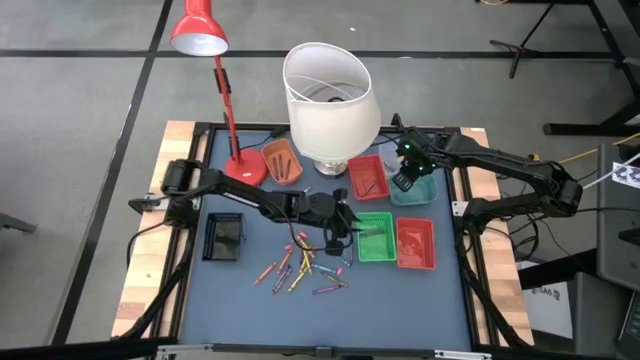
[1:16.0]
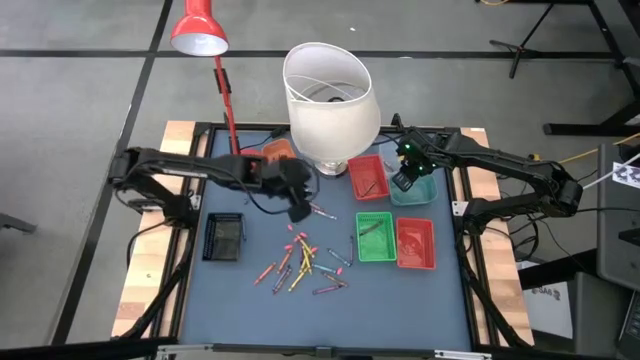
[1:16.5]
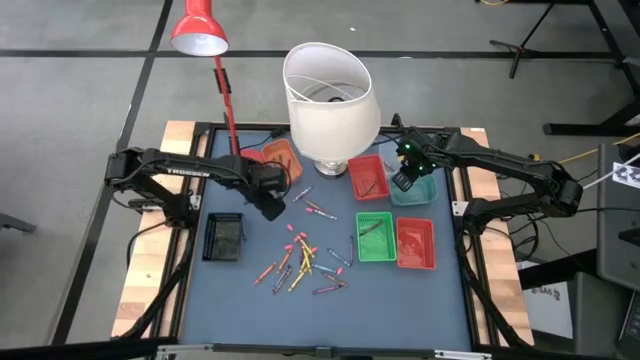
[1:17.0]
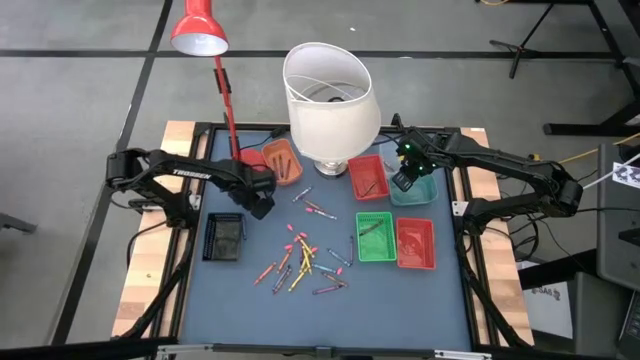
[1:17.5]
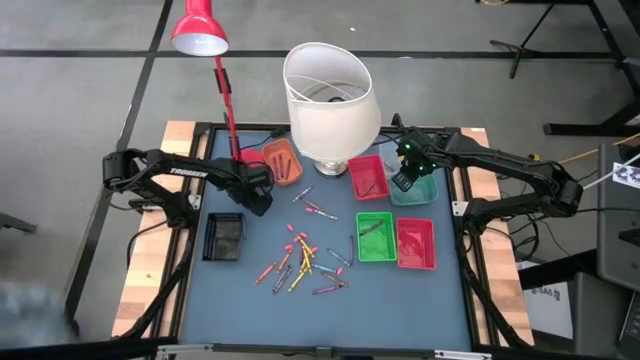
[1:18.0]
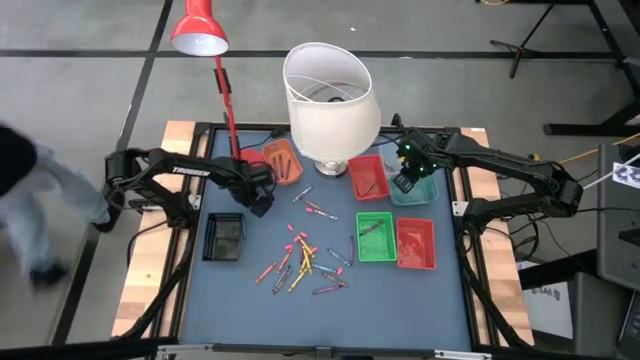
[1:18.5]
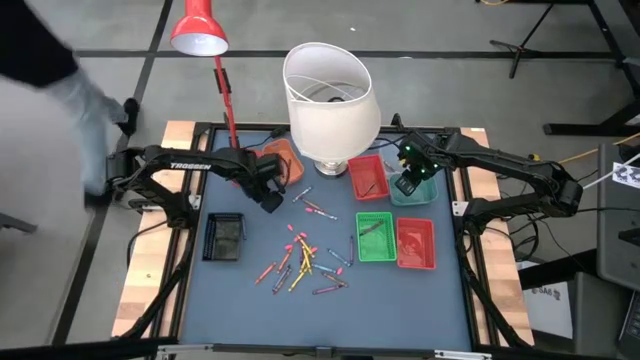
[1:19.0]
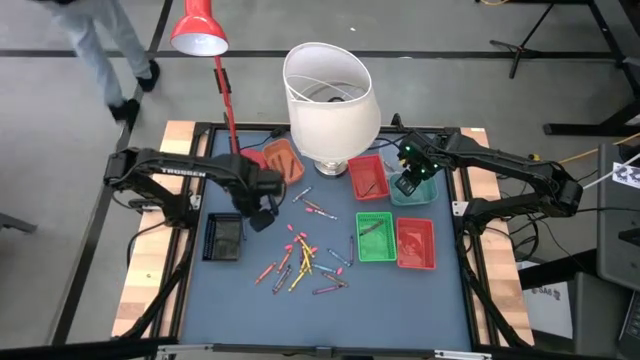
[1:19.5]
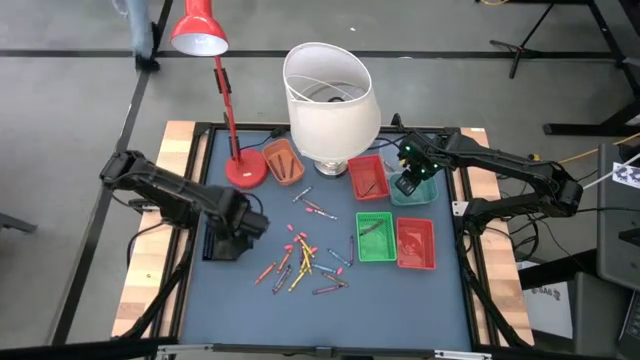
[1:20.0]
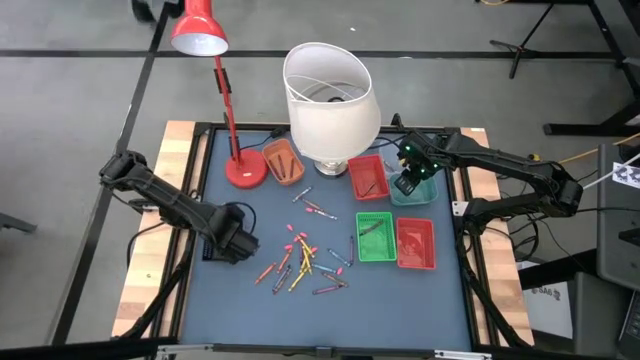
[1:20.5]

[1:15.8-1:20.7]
Task: Sort crayons
Put the blue crayon into the black bin

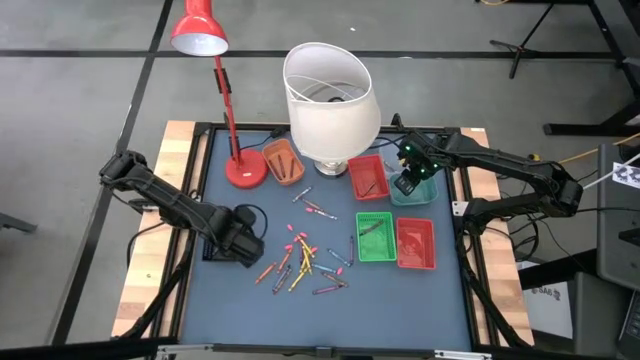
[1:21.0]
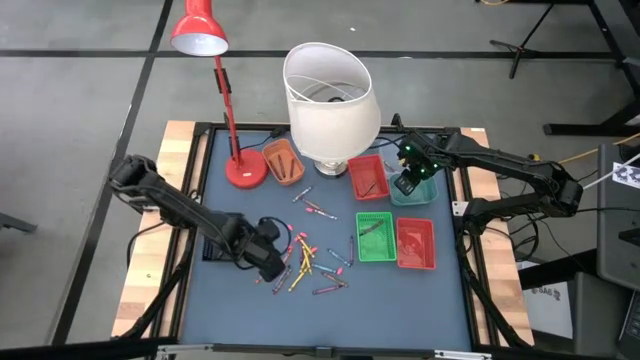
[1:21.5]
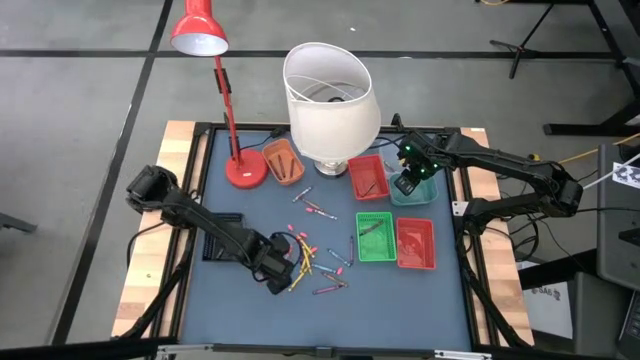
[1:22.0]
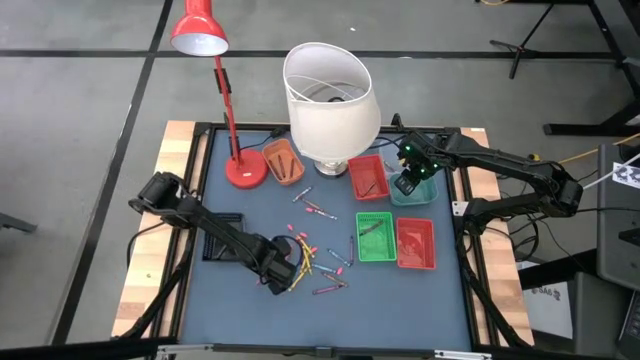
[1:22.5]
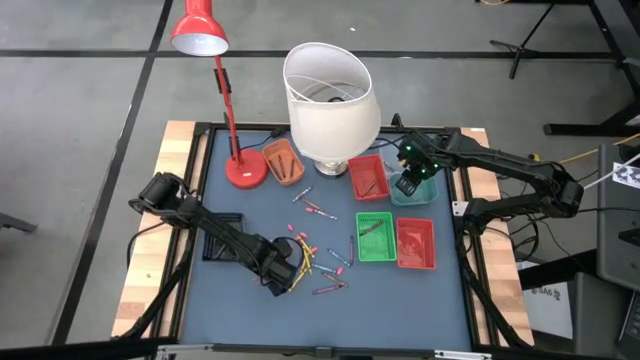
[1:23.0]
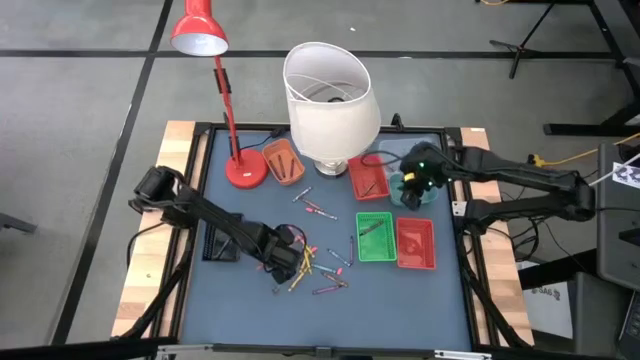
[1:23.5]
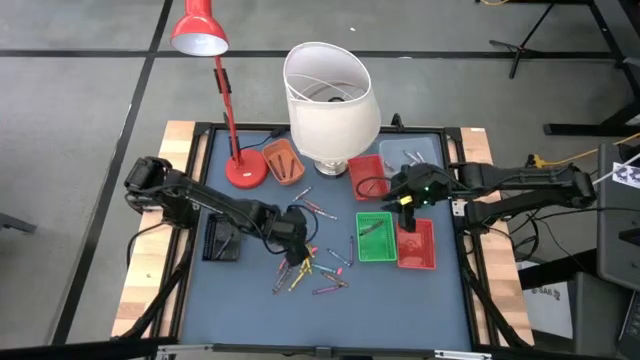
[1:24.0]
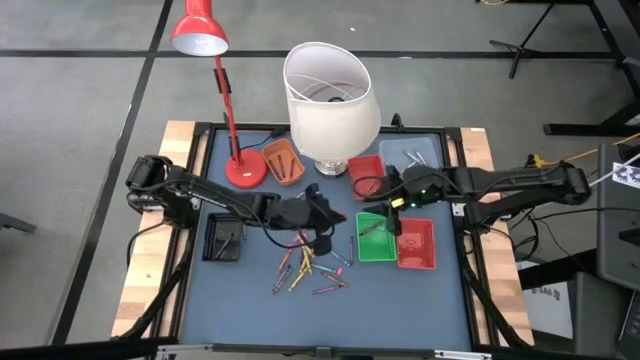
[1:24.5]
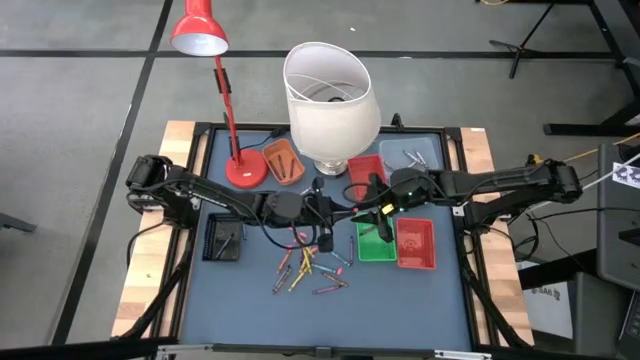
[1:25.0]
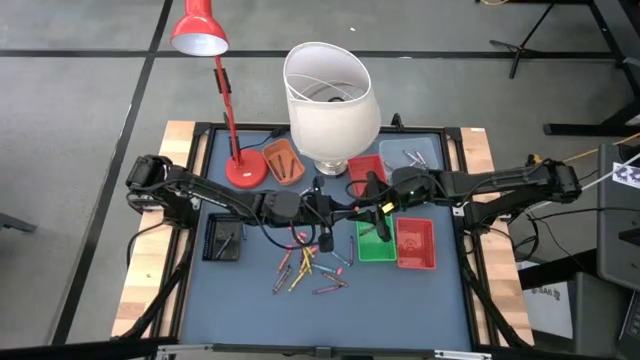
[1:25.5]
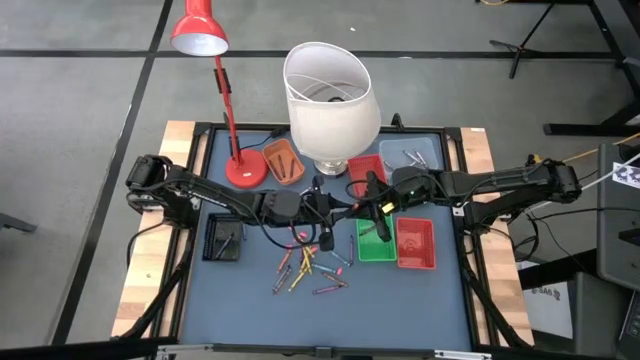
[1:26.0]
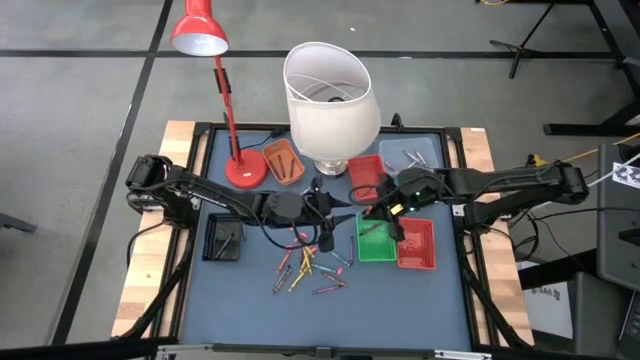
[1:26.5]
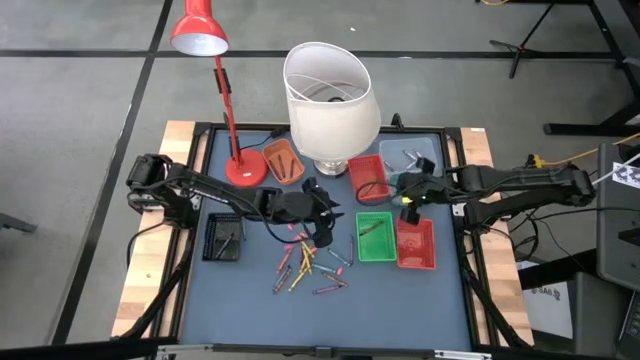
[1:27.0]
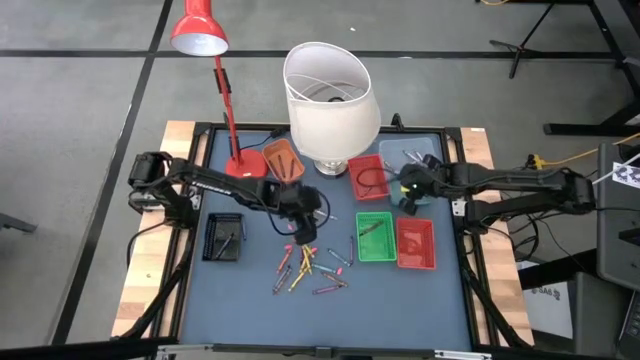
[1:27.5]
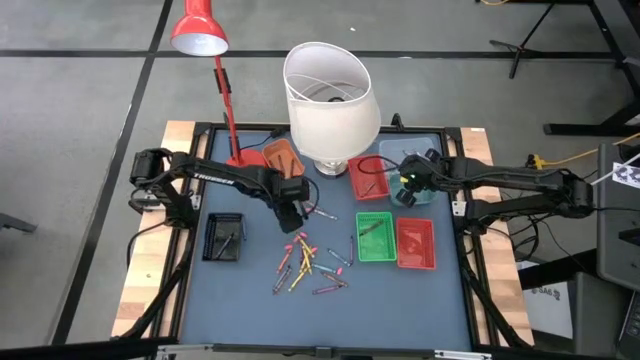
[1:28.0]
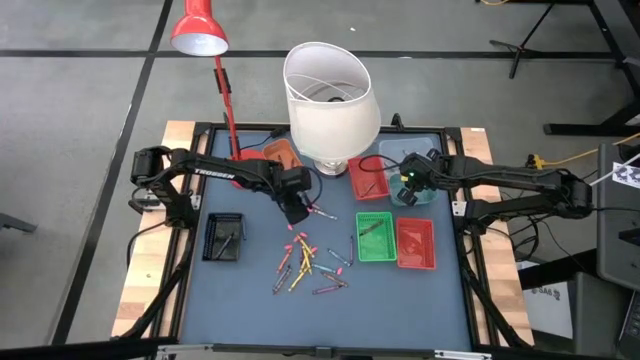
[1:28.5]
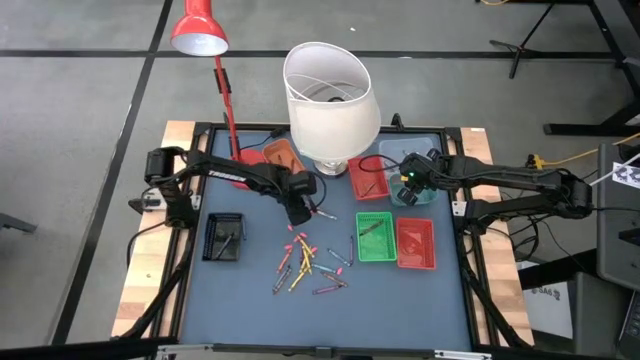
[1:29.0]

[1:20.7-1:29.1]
Put the orange crayon into the blue bin

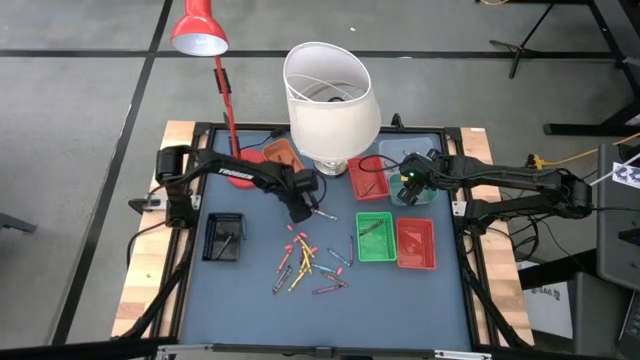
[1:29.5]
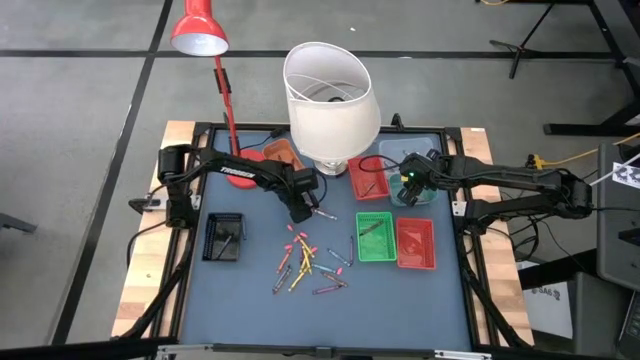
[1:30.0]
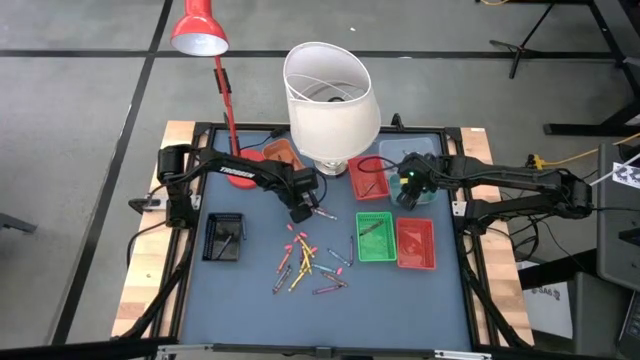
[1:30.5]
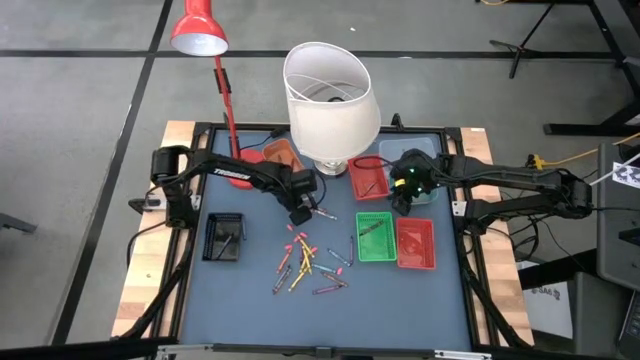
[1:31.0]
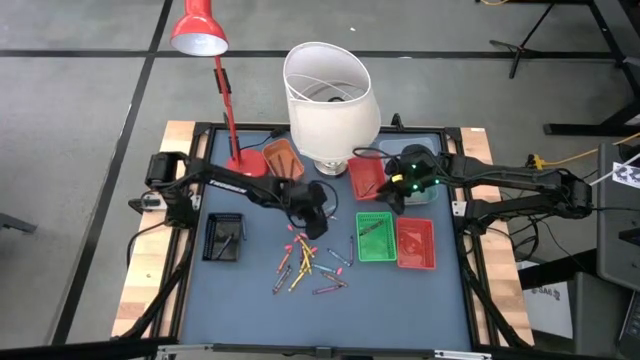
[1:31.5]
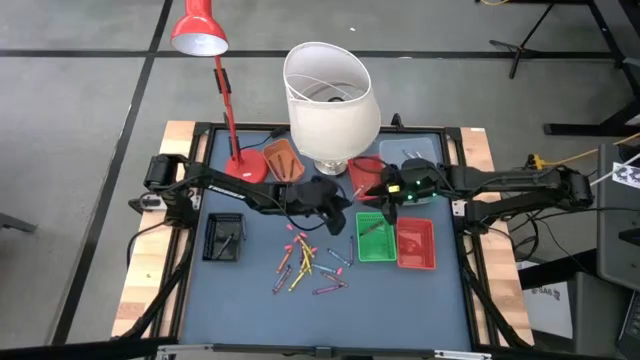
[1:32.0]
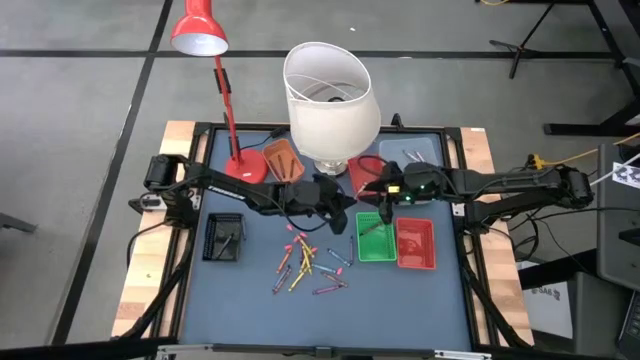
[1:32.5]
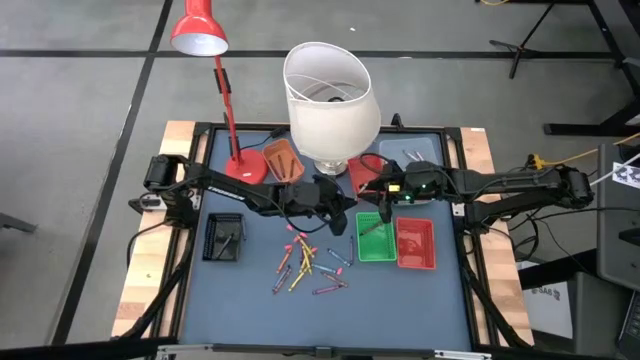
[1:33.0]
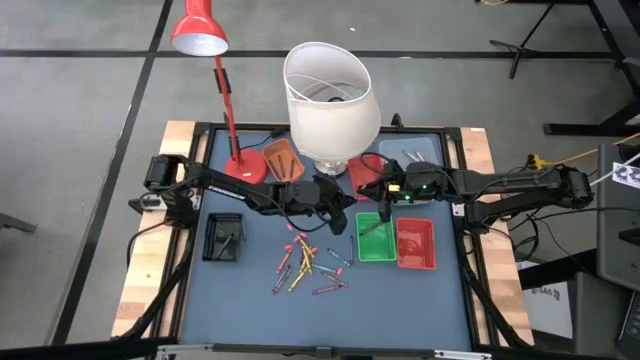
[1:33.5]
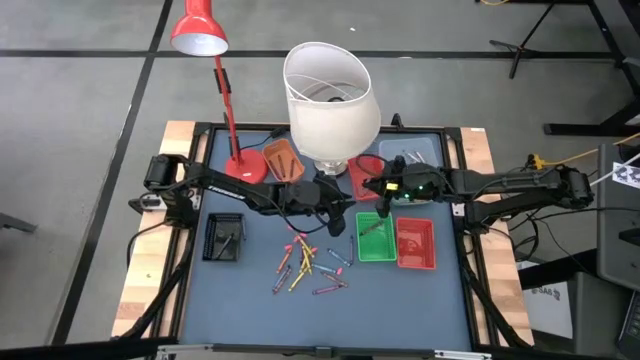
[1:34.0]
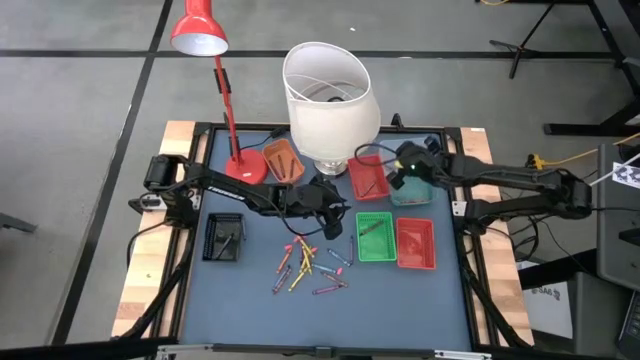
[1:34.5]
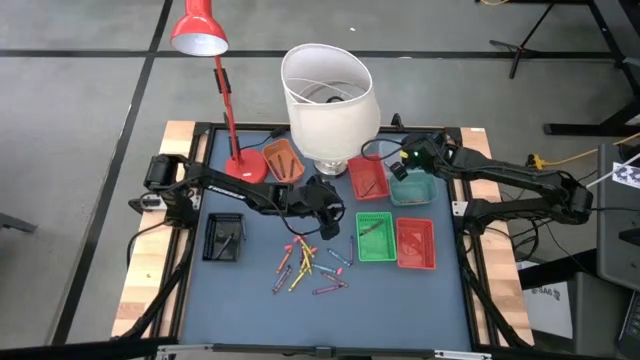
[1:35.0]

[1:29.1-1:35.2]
Put the gray crayon into the transparent bin

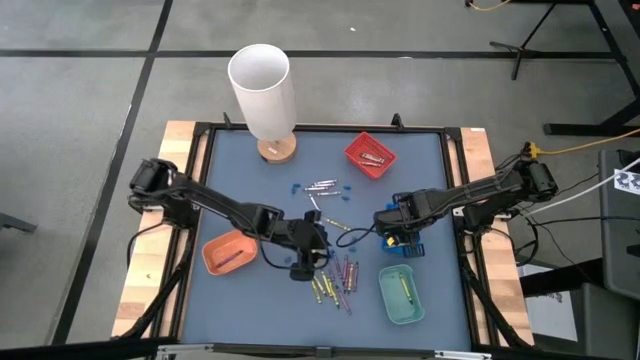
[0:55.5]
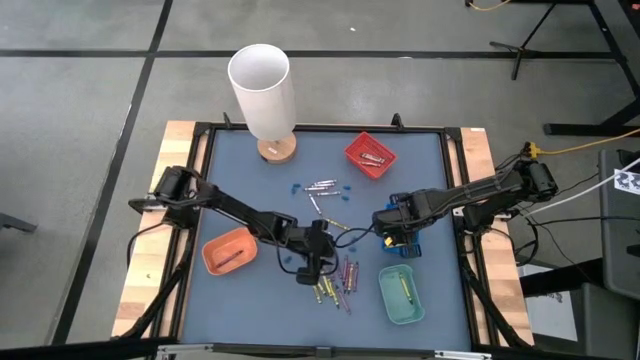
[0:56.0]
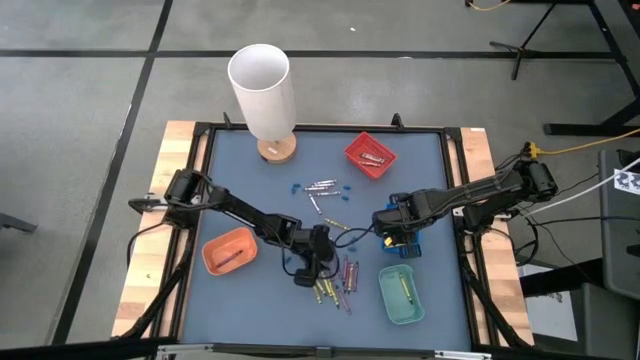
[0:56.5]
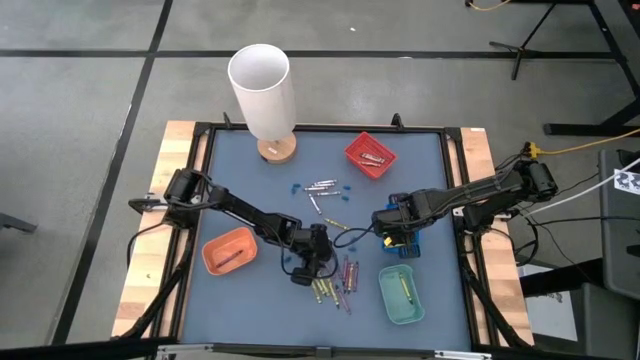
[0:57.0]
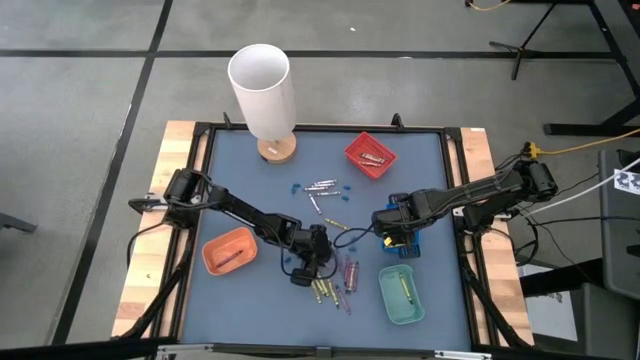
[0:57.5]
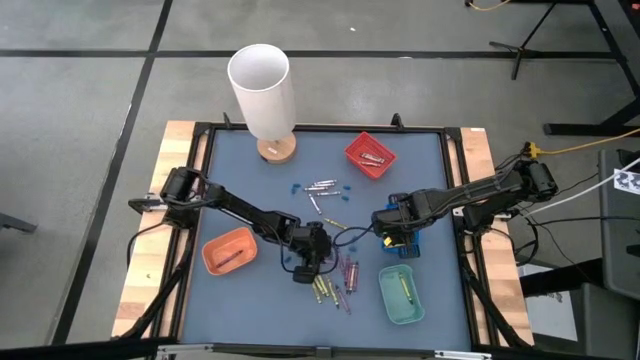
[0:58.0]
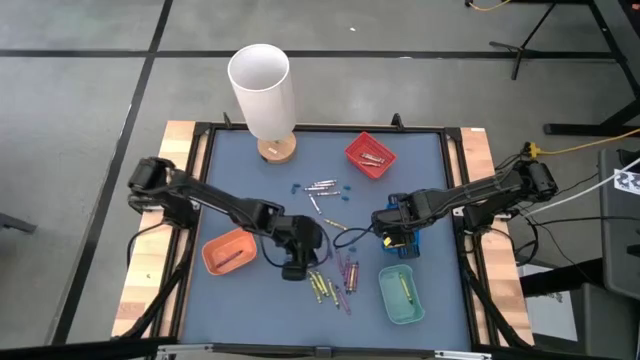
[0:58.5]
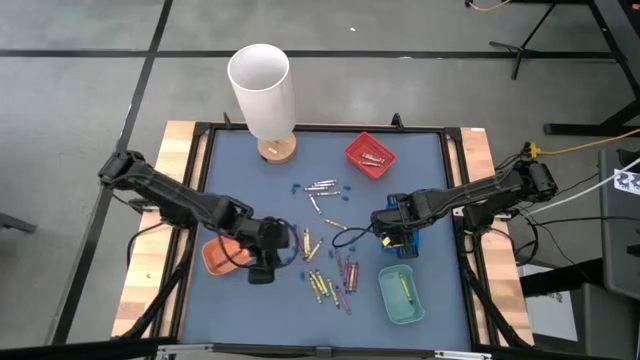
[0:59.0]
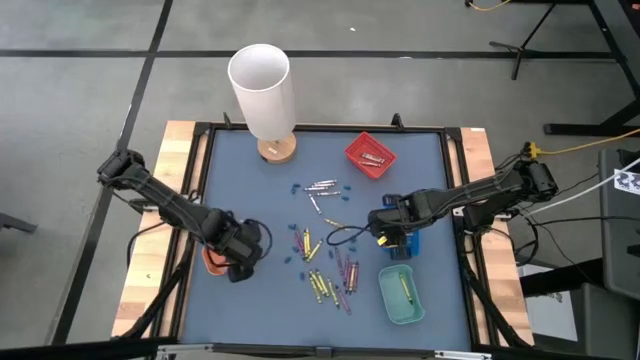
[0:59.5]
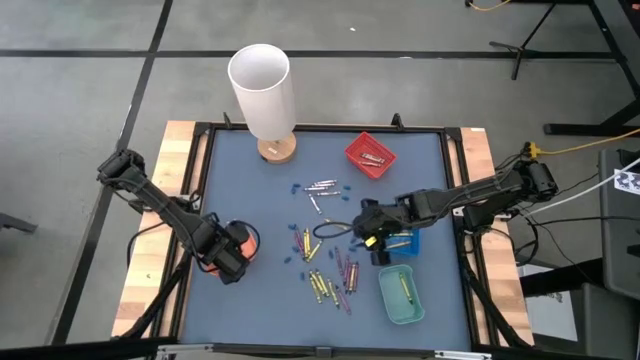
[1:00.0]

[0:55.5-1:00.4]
Task: Sort crayons
Put the violet crayon into the orange bin
